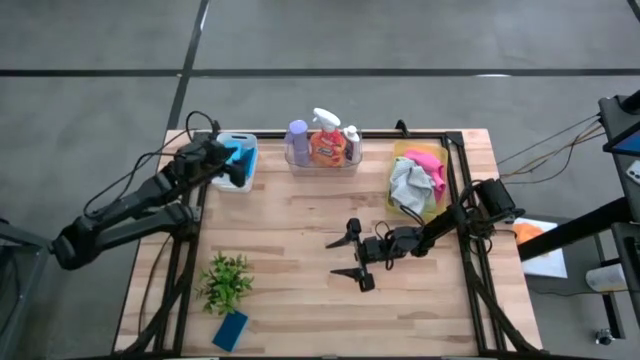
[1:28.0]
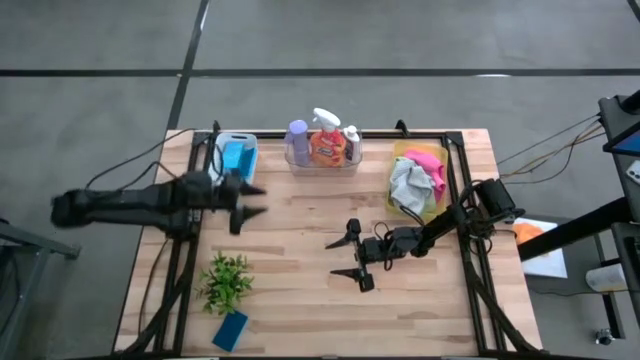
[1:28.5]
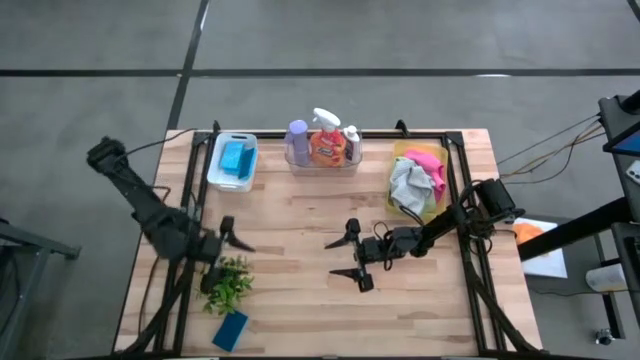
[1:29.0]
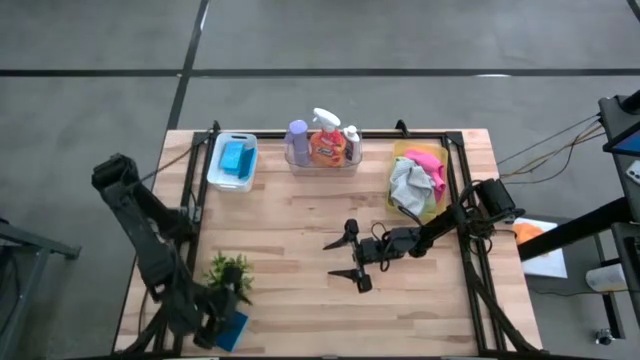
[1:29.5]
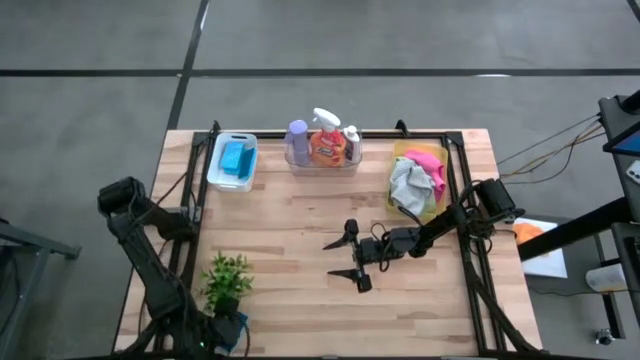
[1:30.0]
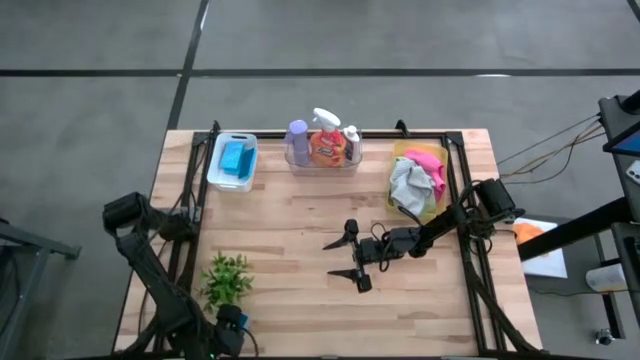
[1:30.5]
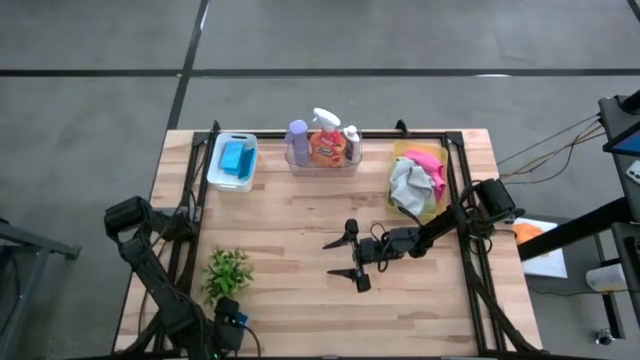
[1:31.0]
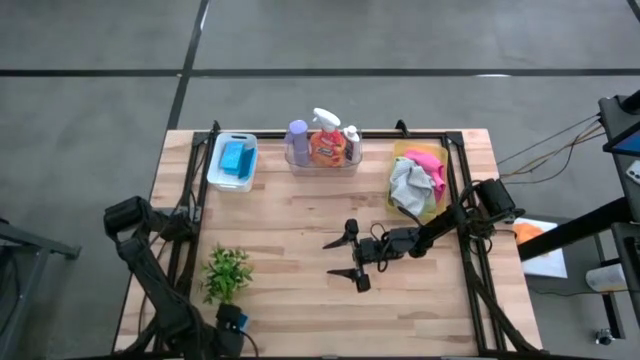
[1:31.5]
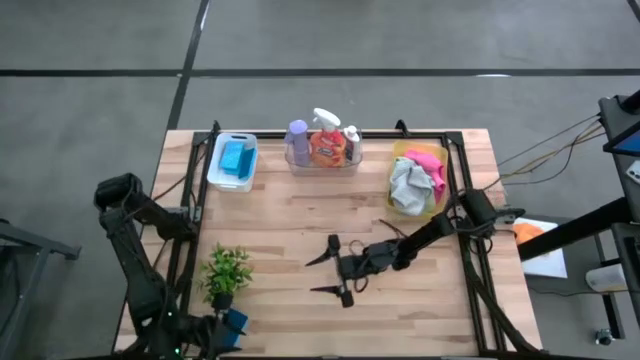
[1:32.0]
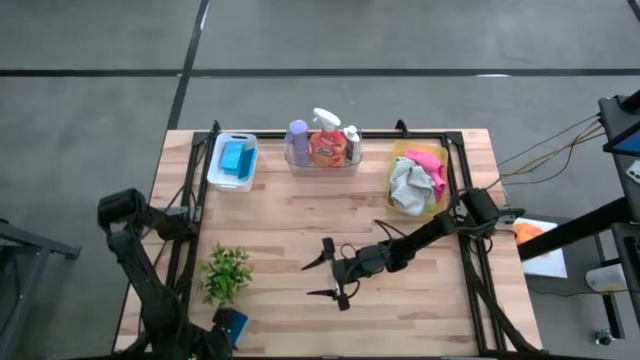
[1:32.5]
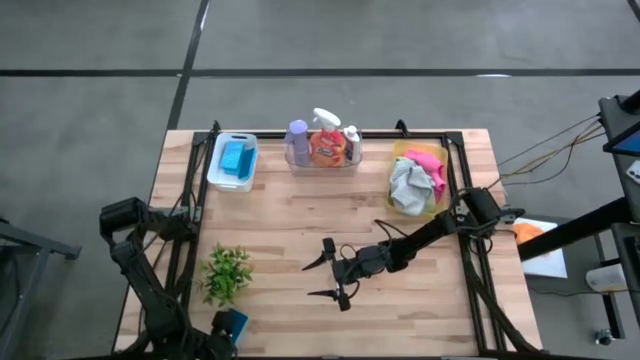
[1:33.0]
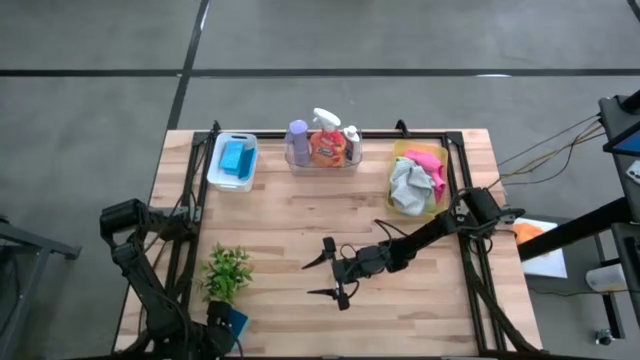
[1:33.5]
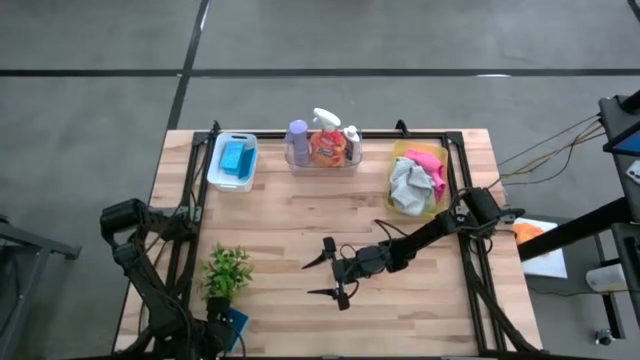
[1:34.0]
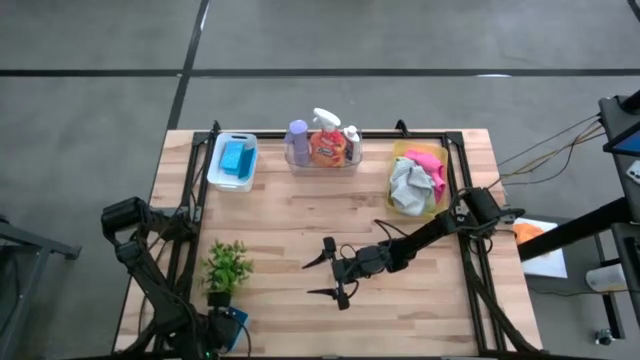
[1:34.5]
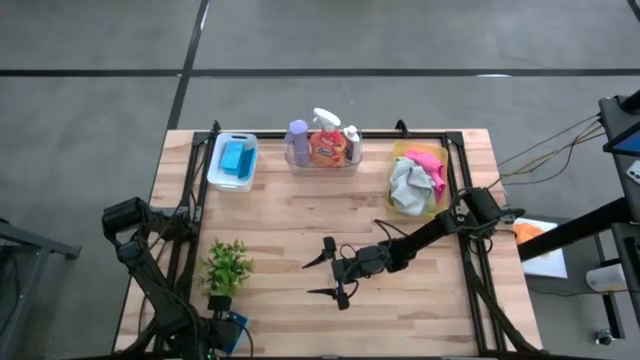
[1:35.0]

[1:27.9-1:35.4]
Task: Pick & Place Kitchen Items
Put the blue sponge into the white bin

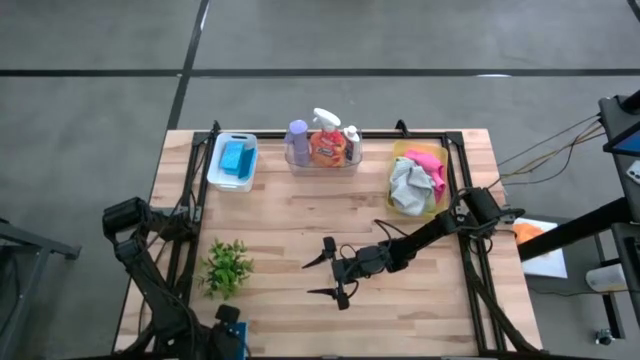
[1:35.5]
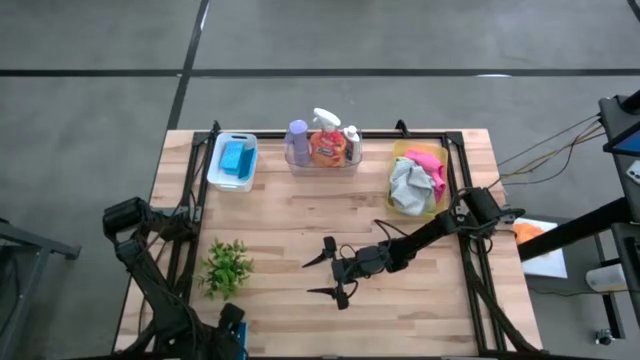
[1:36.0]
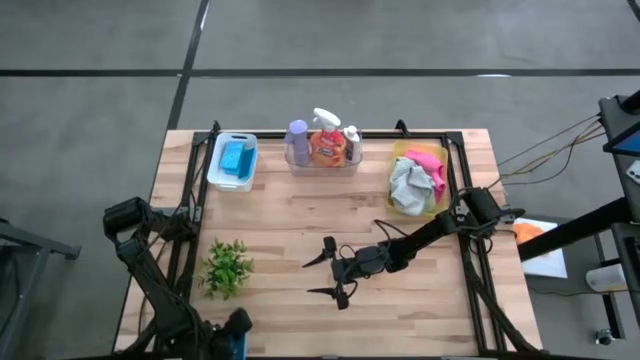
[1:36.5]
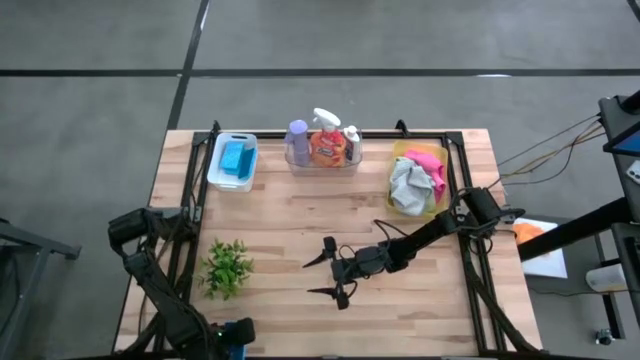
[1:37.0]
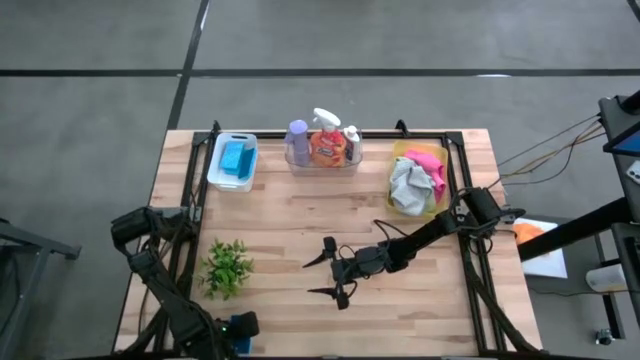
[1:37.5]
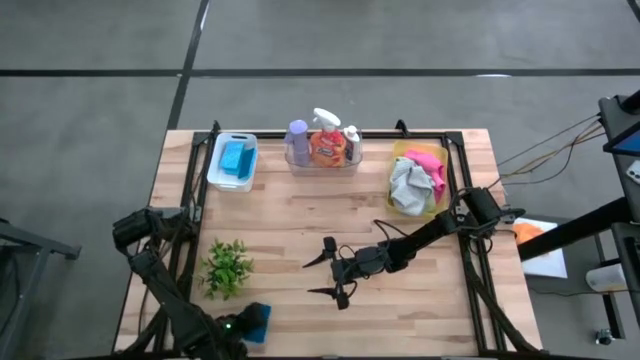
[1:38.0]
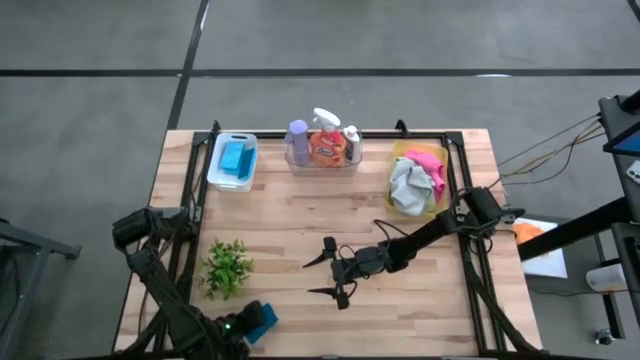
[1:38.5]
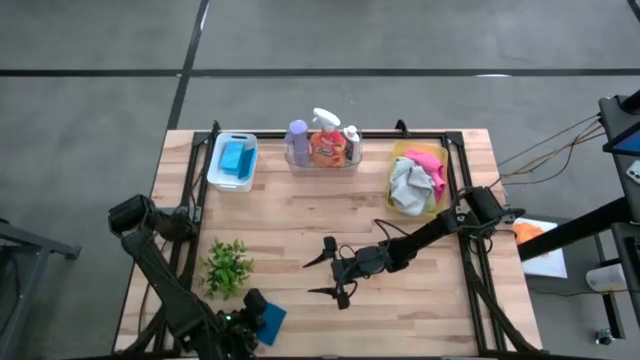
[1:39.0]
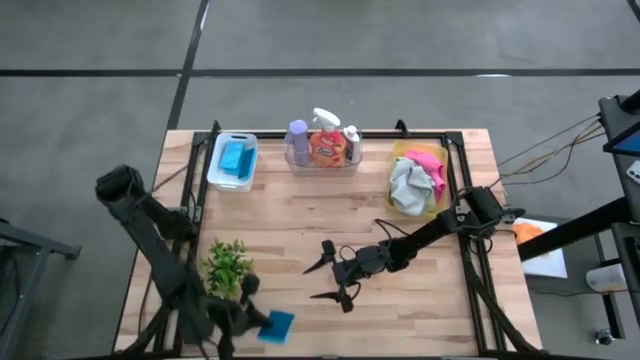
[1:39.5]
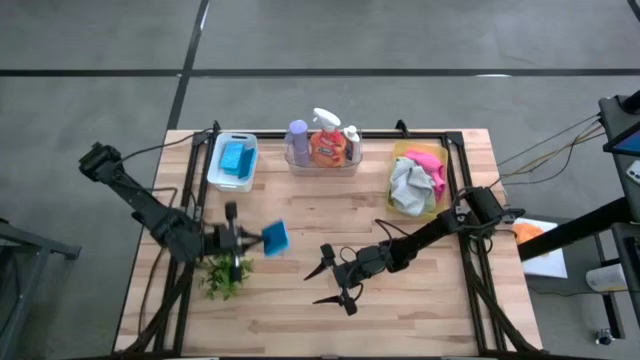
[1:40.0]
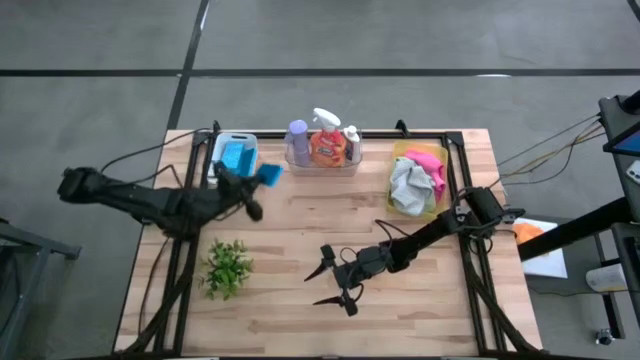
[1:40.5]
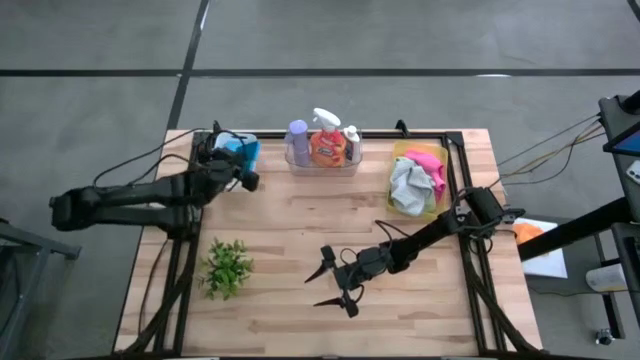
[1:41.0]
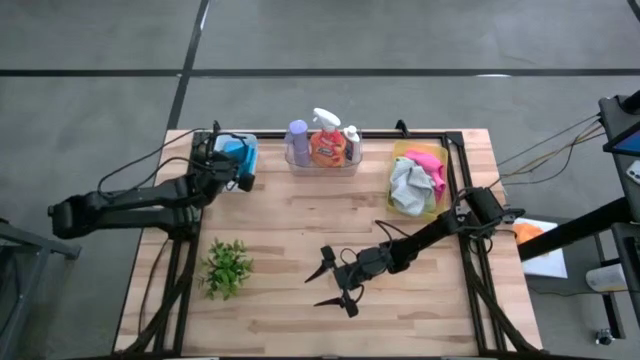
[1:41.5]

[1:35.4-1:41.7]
Put the blue sponge into the white bin

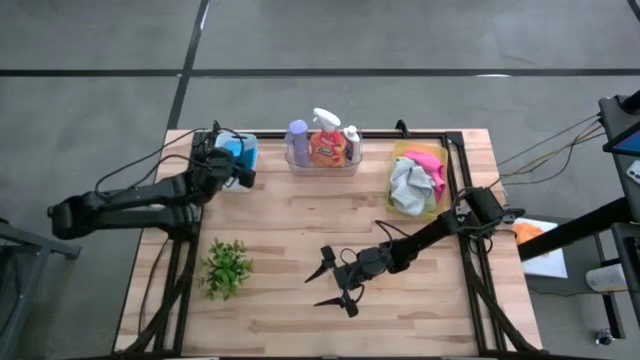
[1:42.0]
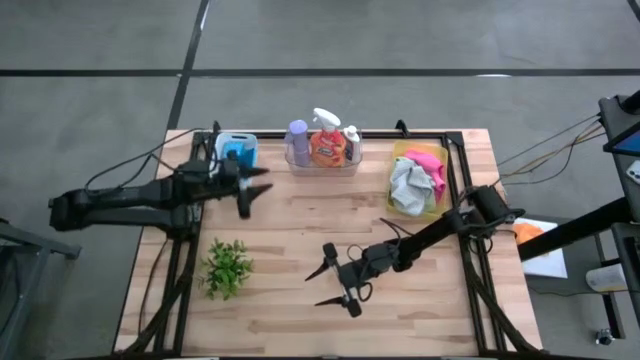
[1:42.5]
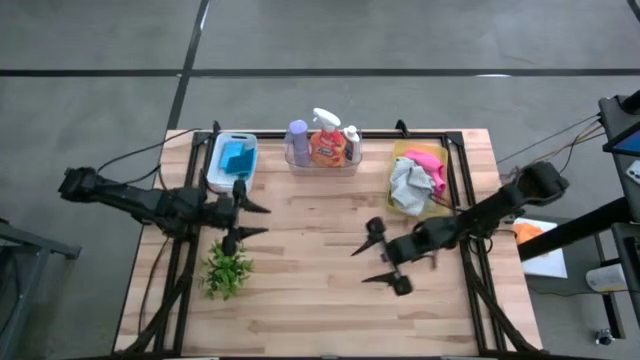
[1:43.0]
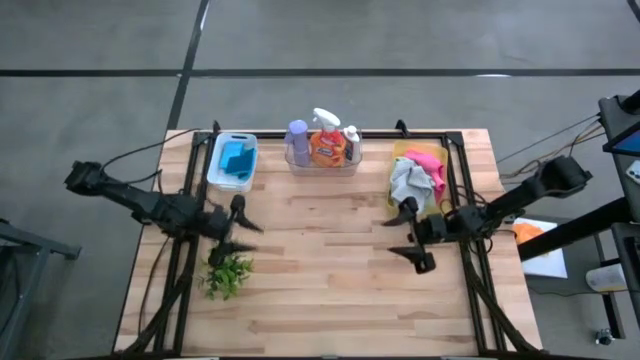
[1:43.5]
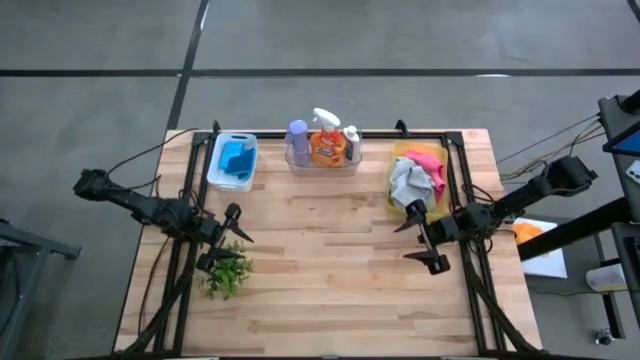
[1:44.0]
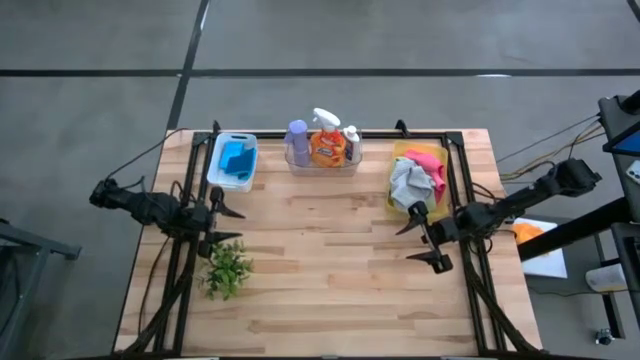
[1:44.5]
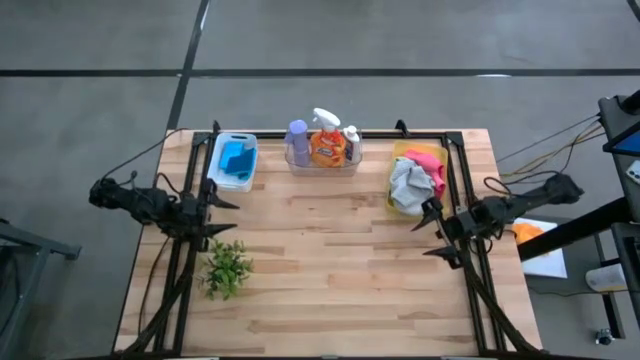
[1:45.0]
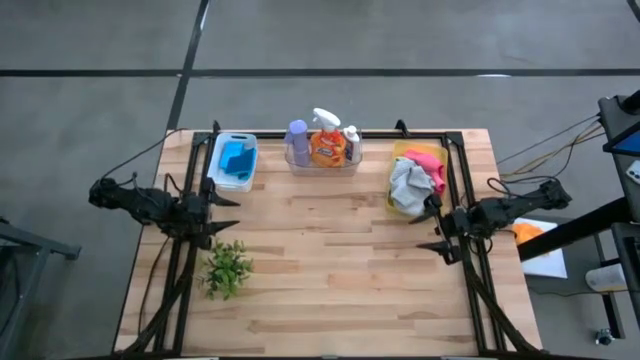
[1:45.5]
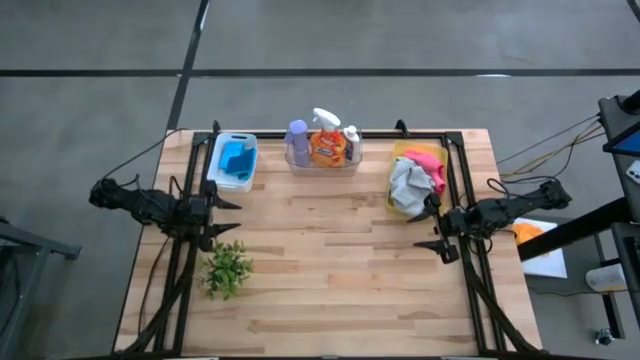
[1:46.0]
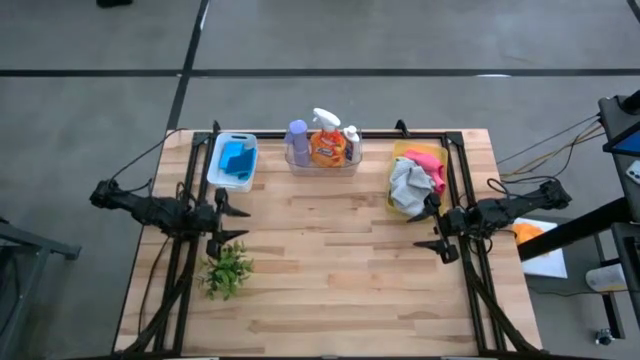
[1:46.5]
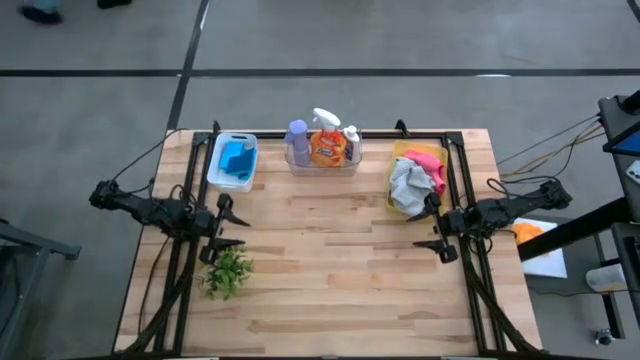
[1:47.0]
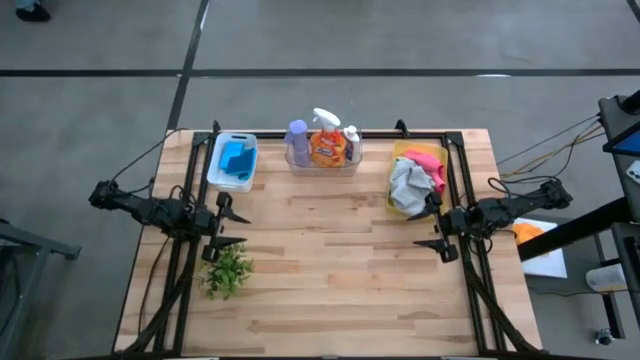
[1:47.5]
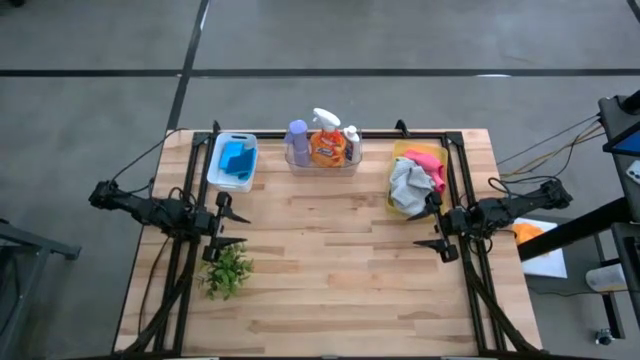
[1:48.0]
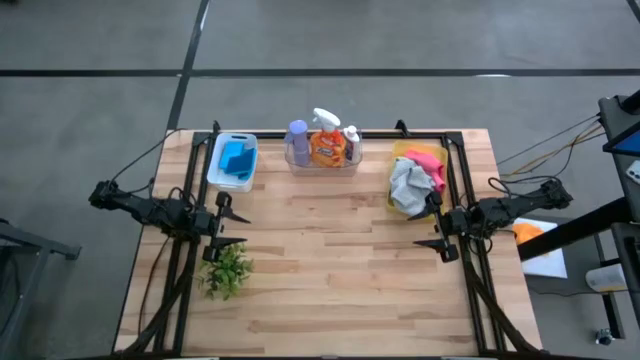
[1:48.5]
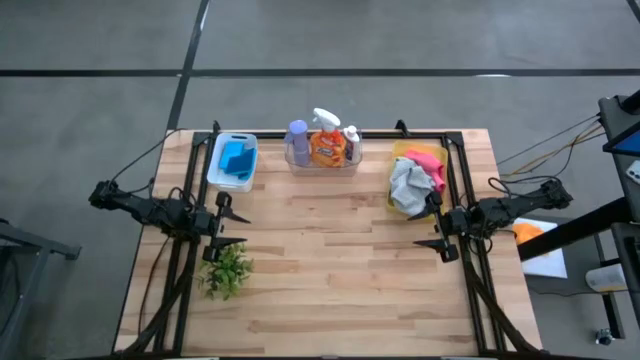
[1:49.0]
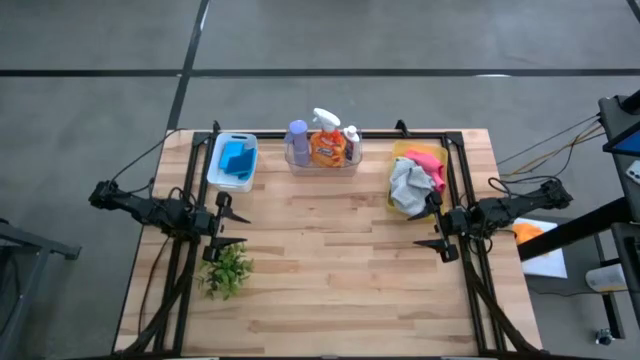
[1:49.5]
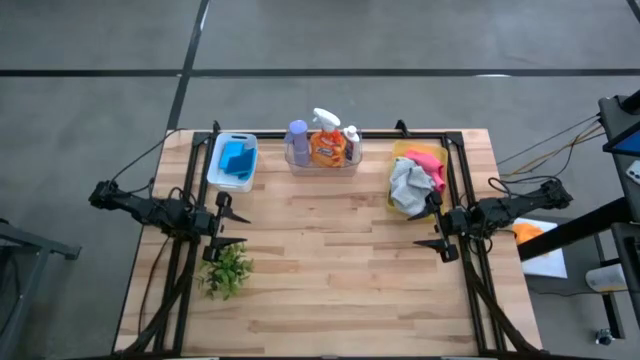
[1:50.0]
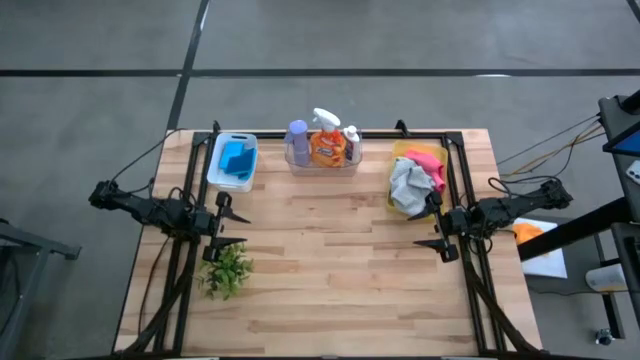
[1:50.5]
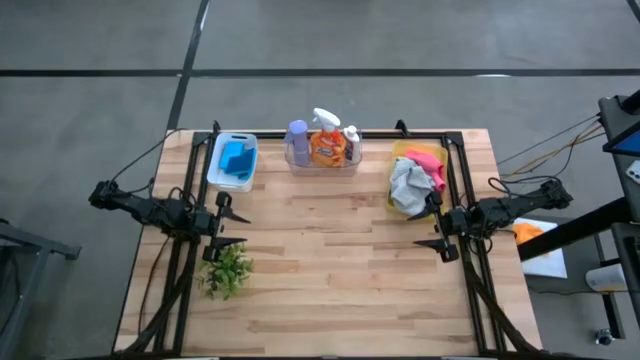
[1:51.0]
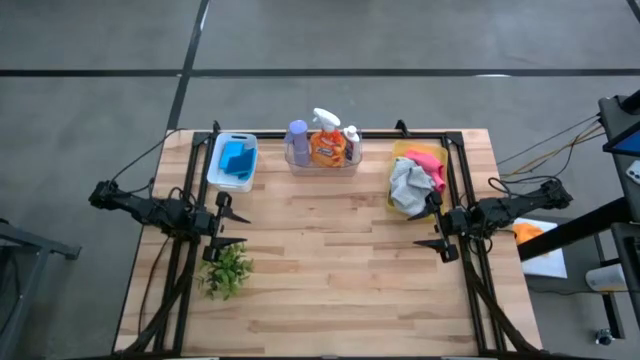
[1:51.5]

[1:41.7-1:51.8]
Return to Home Position
